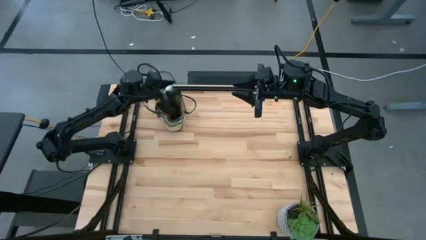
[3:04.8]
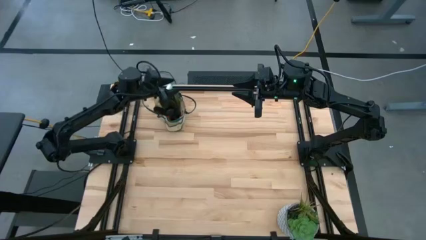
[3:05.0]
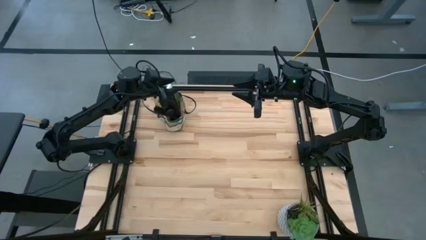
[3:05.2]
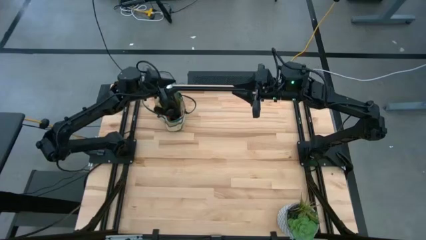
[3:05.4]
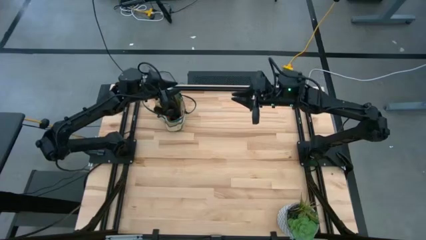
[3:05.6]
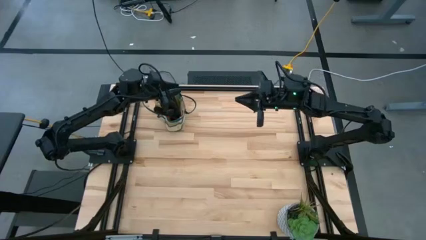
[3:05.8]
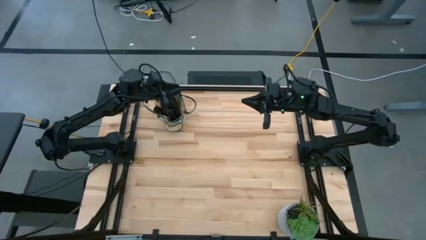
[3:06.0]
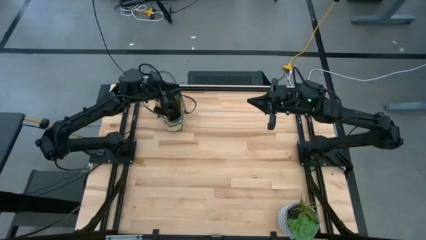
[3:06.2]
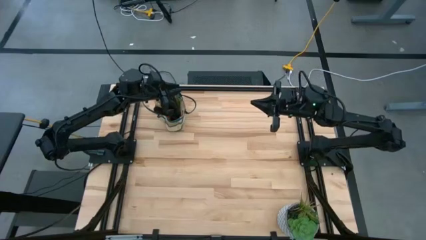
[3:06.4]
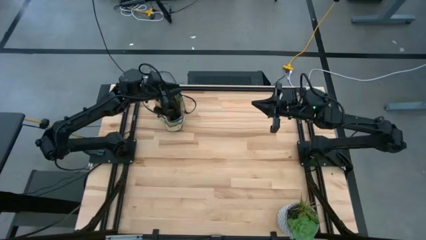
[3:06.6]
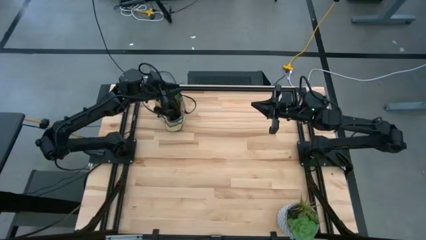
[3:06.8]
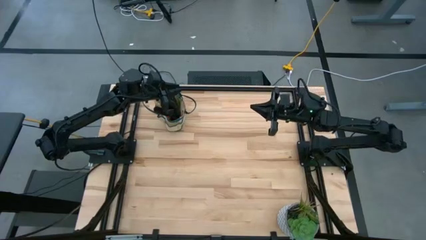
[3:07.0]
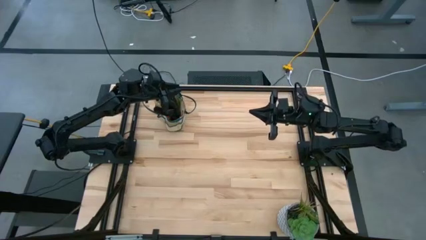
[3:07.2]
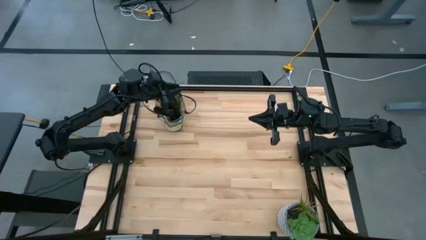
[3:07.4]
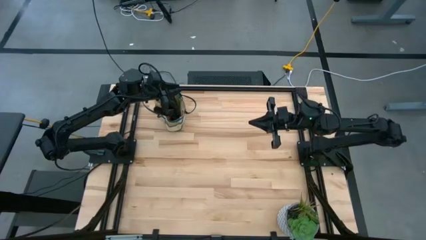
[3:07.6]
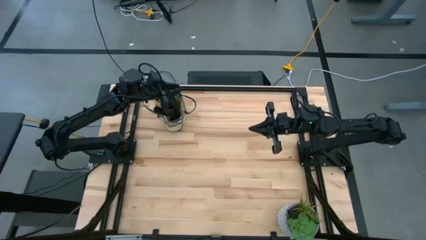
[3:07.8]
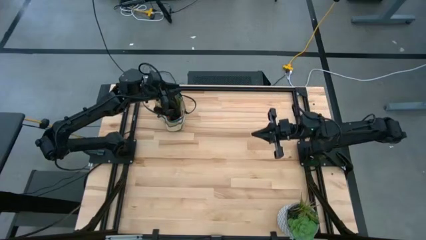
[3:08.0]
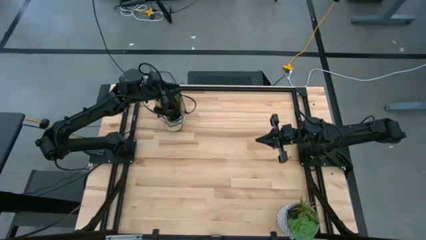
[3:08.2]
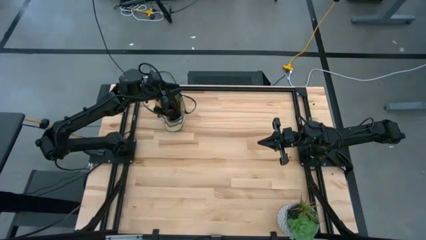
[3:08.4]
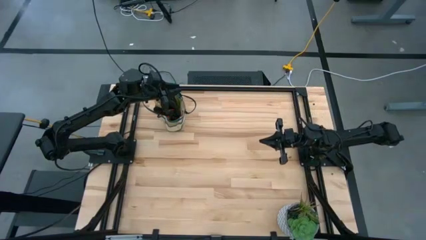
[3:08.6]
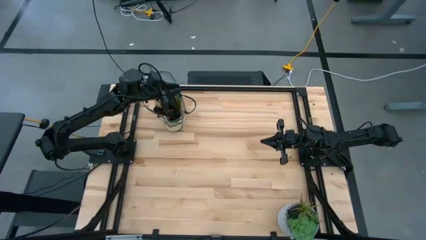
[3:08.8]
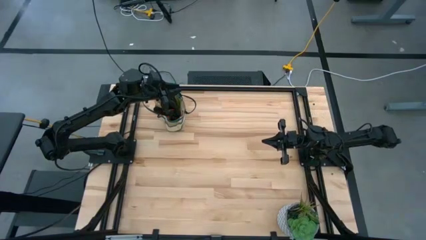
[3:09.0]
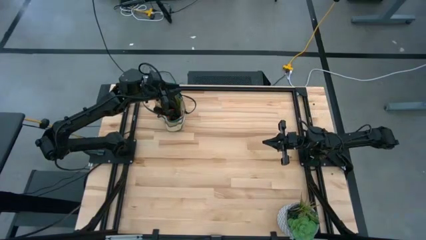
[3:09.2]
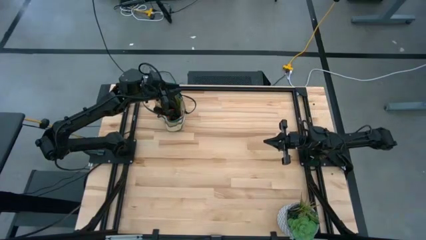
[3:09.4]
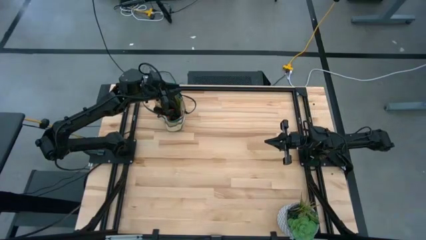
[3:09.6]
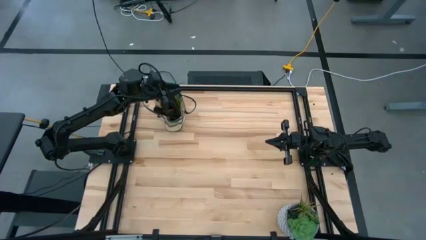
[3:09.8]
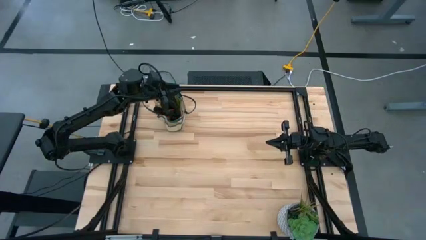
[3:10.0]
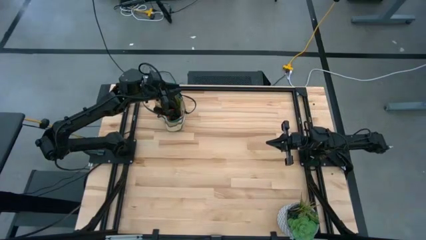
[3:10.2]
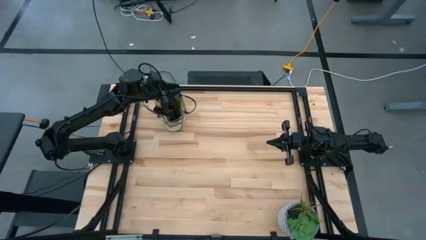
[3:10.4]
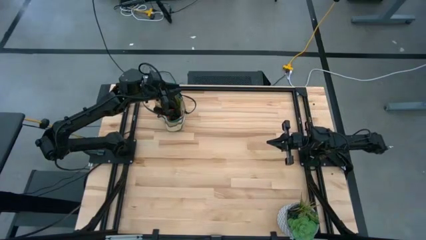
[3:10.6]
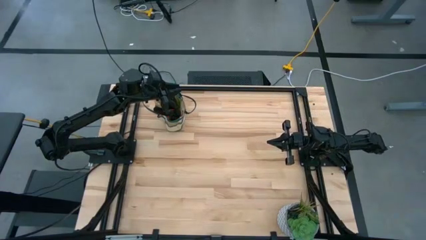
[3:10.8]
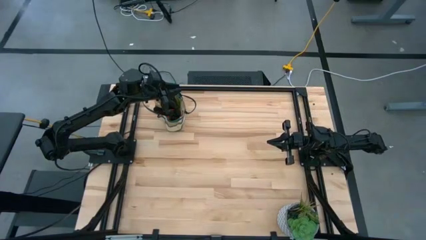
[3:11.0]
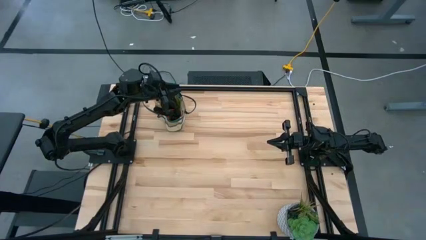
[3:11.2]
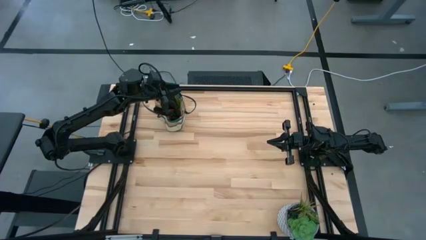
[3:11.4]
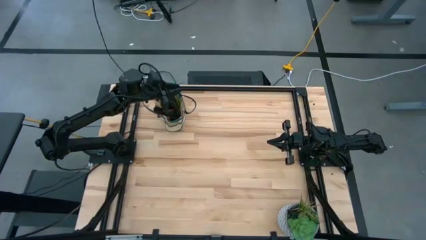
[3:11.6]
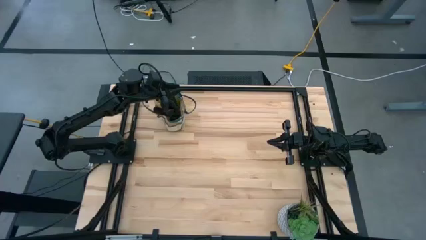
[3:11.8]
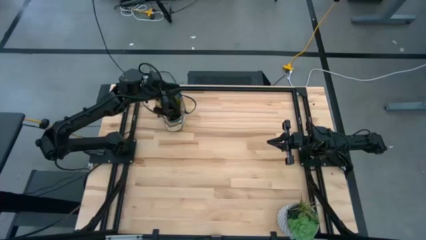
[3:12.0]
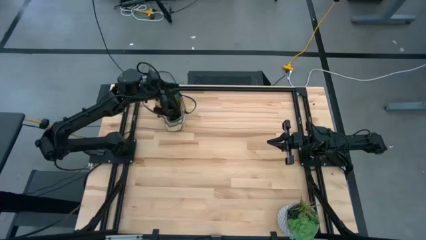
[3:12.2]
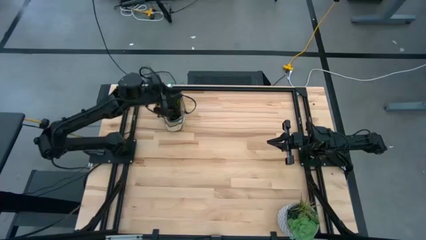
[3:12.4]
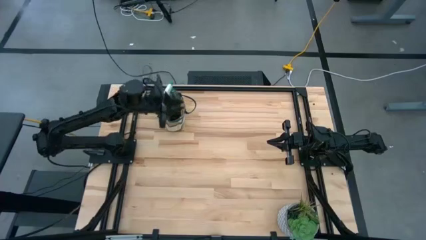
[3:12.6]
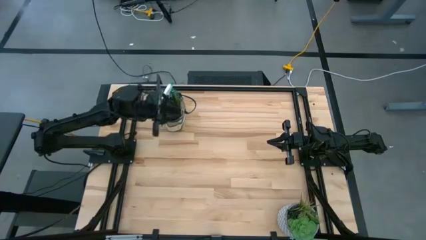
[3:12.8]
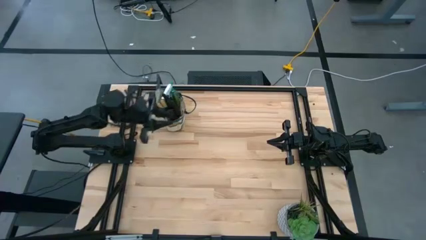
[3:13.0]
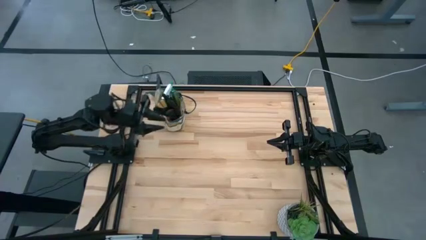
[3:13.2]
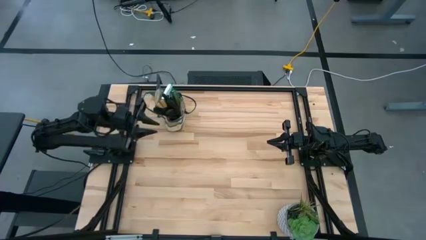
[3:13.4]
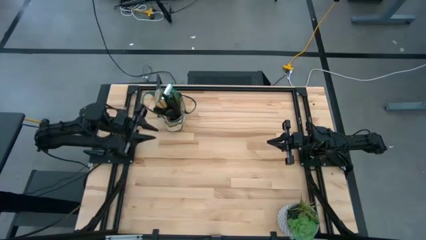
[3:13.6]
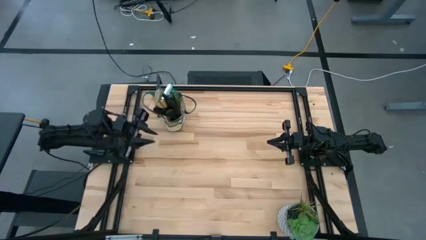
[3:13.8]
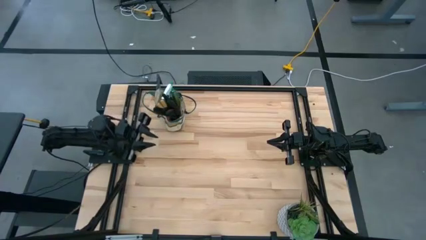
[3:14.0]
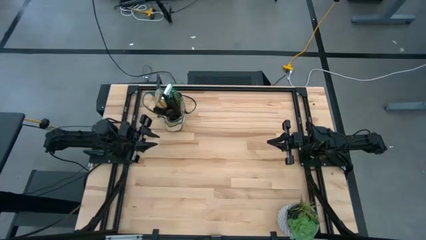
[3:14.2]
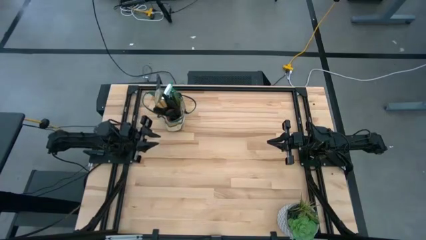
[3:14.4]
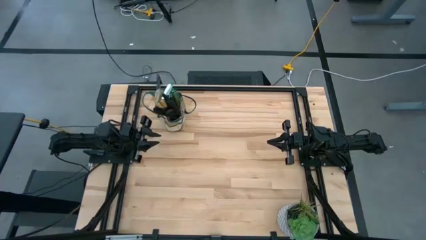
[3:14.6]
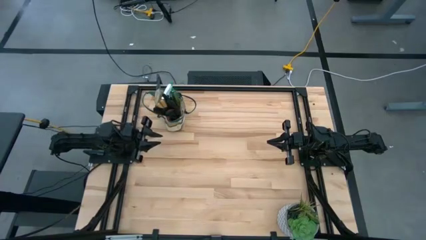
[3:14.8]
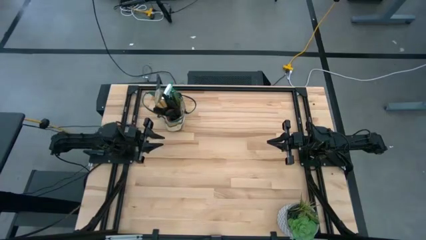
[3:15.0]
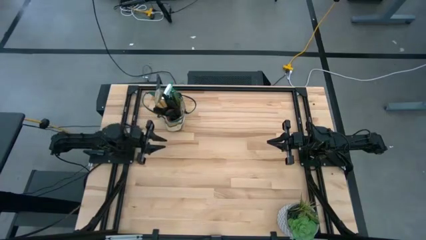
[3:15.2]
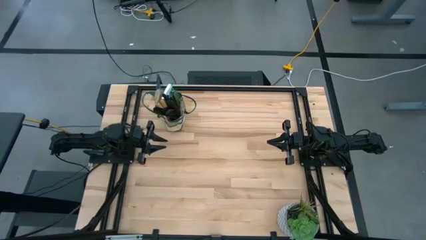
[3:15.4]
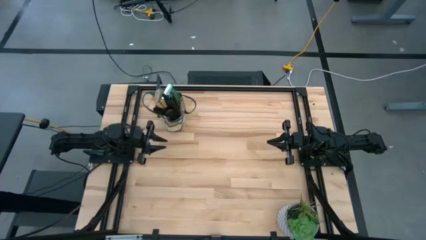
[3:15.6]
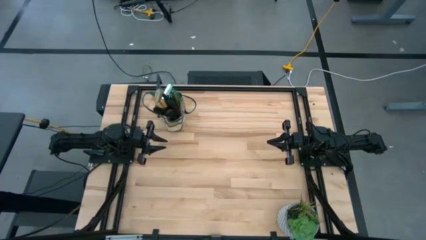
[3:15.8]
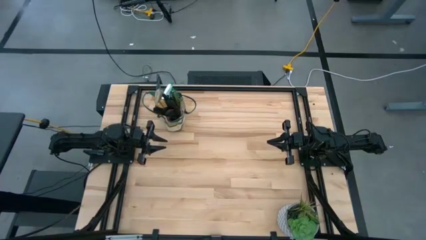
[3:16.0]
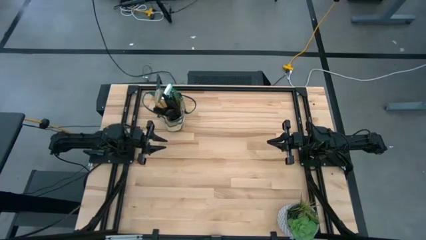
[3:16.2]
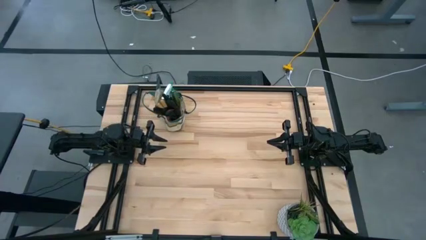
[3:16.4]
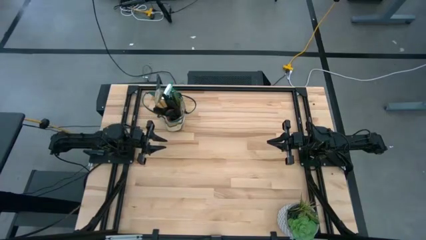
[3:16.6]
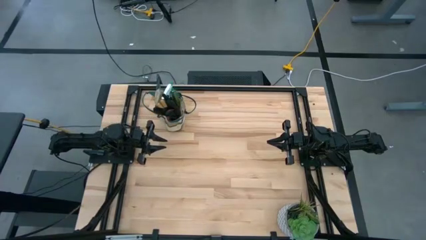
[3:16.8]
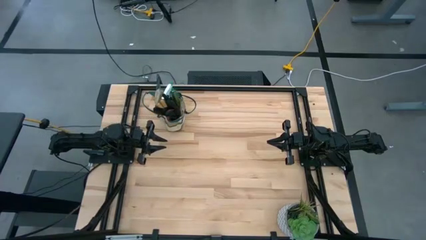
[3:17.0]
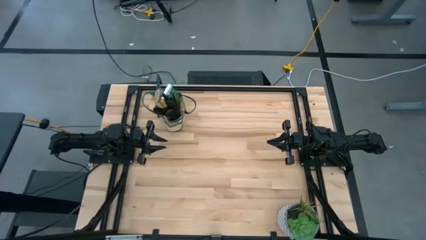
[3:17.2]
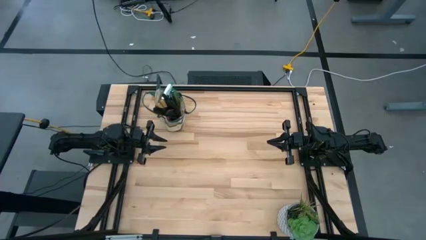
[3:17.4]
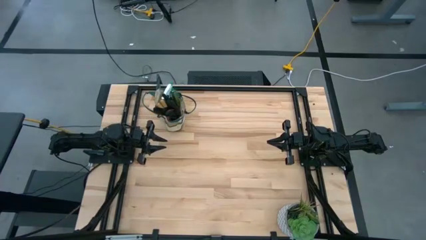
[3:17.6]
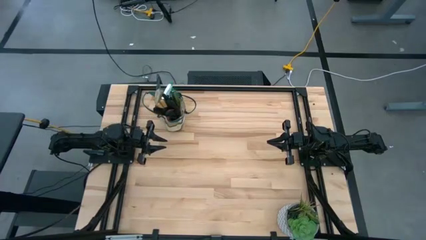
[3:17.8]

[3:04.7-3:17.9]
Task: Pick & Place Garden tools in Gardening bag
Return to Home Position

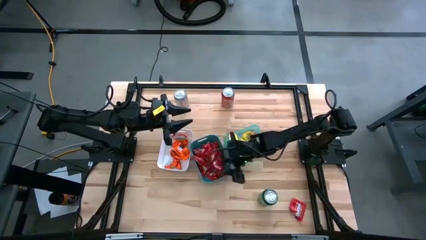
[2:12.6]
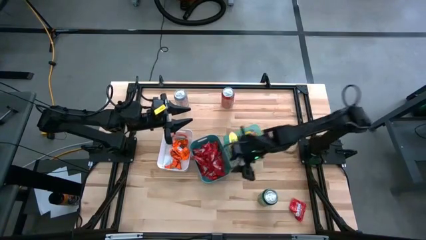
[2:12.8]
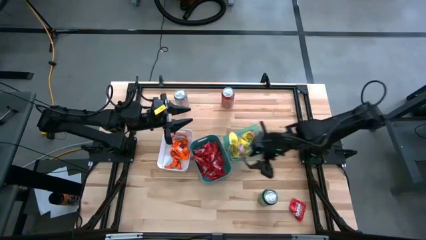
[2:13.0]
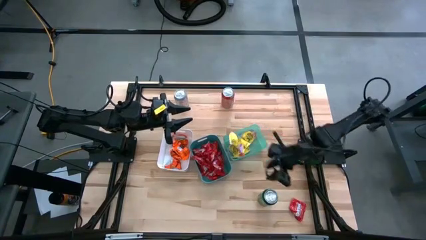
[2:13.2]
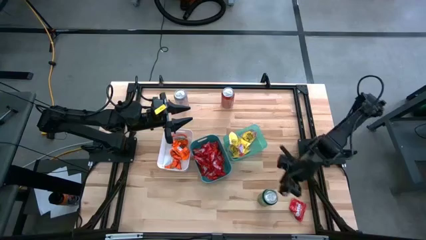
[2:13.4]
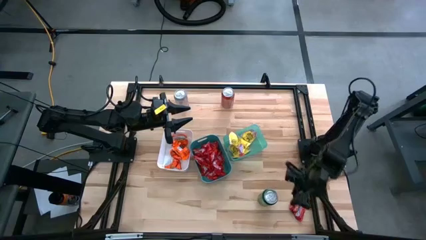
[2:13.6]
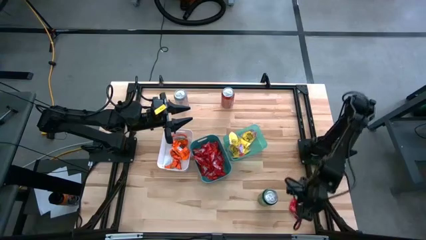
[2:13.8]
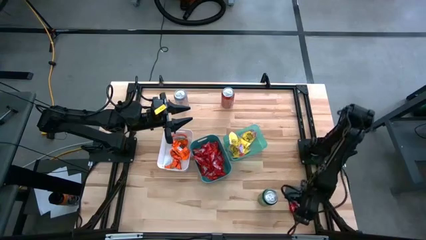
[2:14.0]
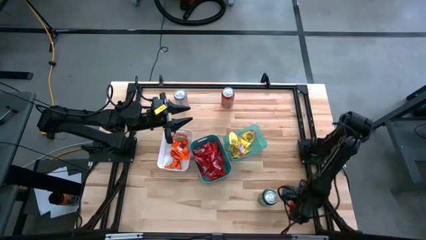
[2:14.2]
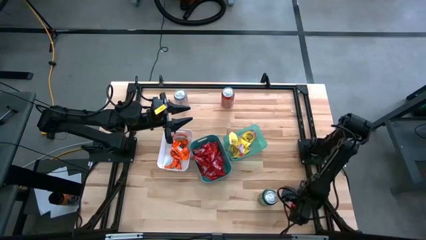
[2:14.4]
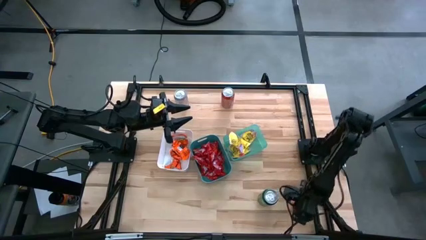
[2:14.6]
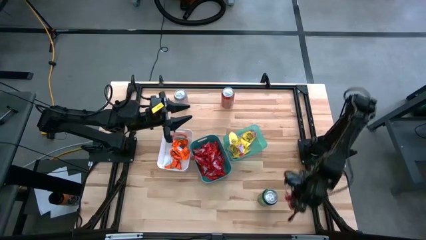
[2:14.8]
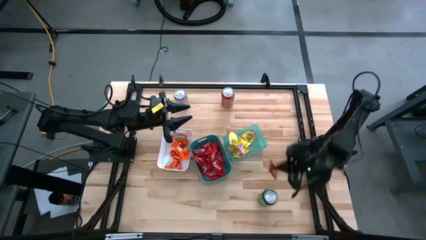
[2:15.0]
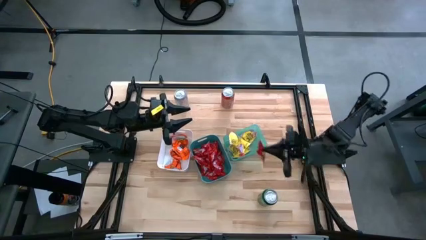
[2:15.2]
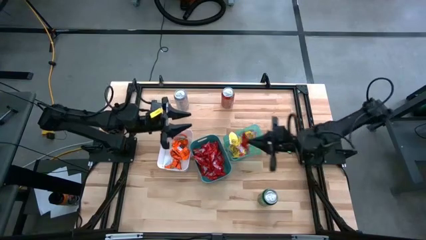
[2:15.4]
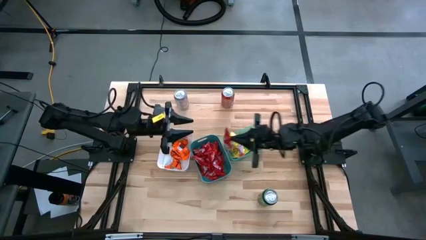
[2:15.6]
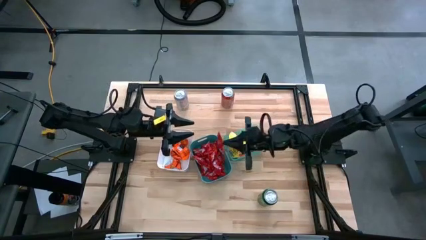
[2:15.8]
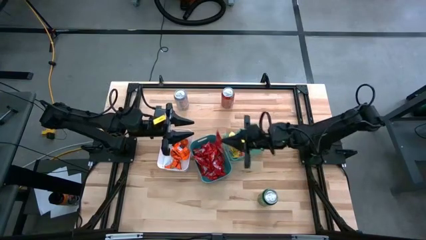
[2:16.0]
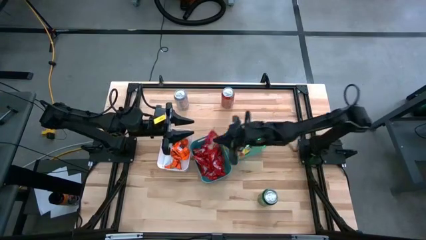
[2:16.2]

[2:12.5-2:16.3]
Task: Sort candy
Put the red candy into the green bin
